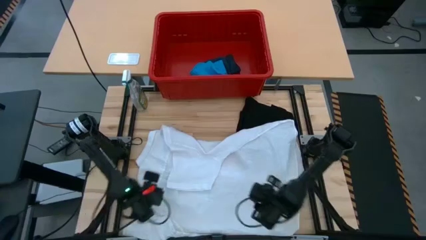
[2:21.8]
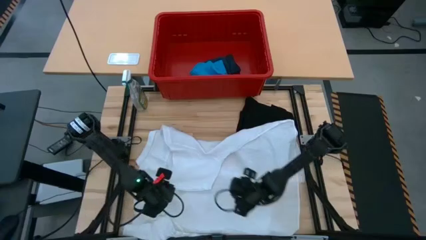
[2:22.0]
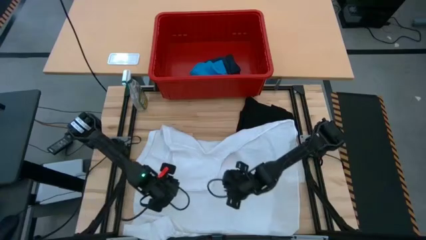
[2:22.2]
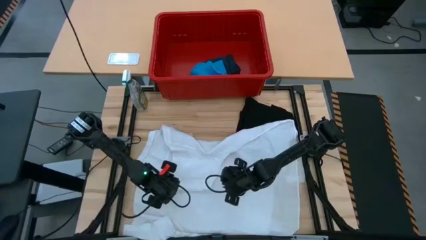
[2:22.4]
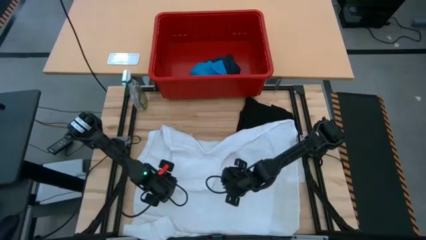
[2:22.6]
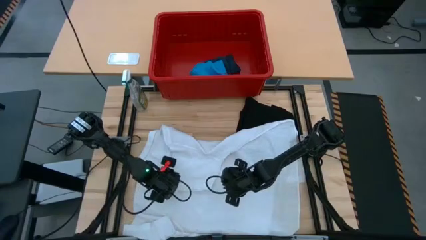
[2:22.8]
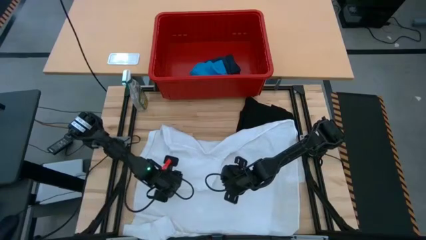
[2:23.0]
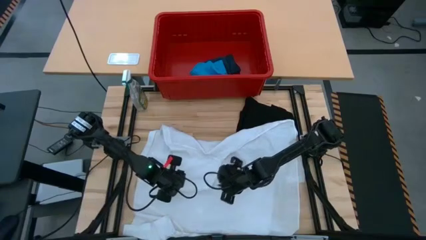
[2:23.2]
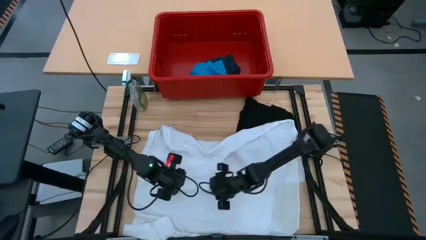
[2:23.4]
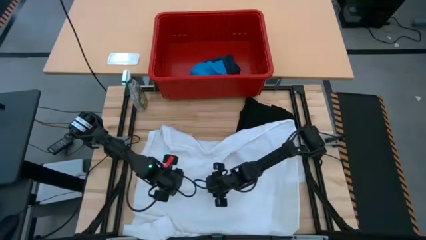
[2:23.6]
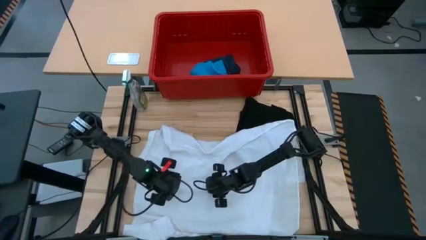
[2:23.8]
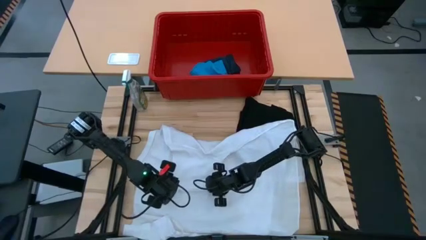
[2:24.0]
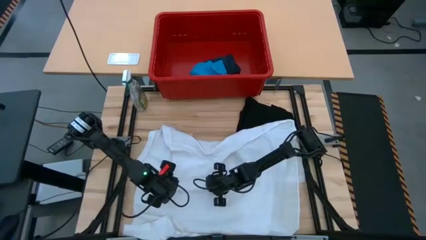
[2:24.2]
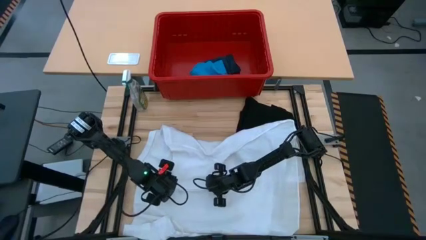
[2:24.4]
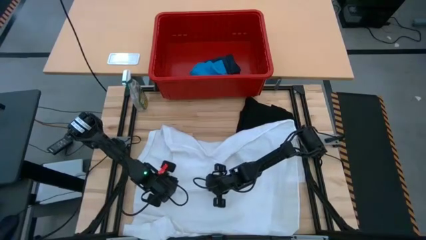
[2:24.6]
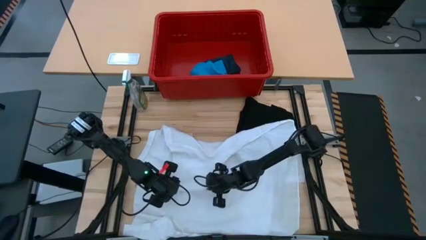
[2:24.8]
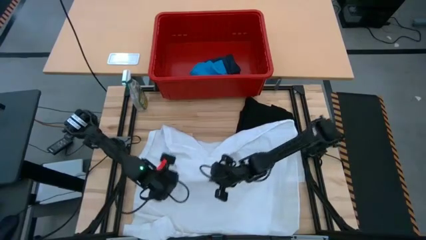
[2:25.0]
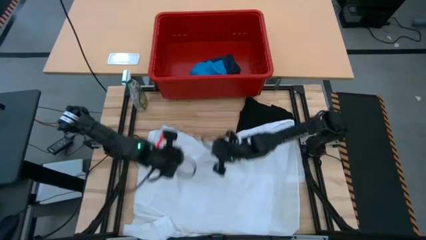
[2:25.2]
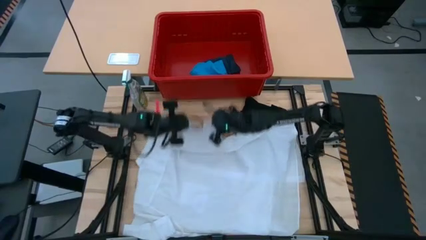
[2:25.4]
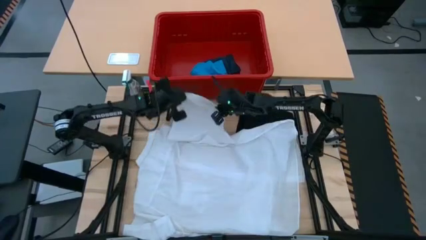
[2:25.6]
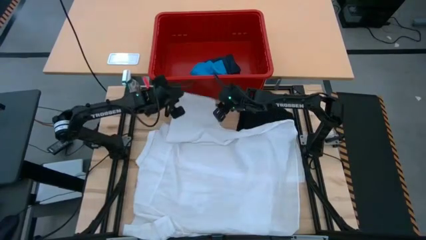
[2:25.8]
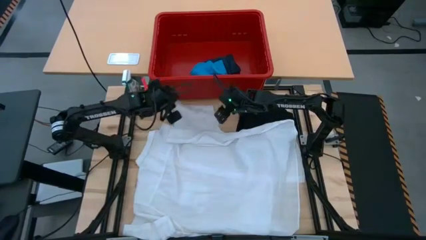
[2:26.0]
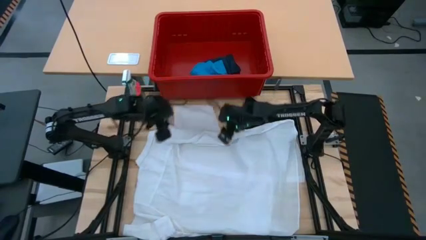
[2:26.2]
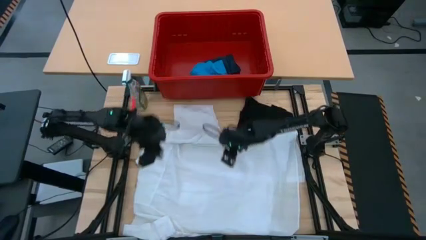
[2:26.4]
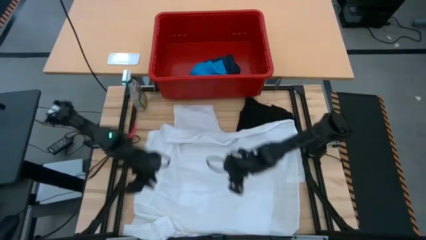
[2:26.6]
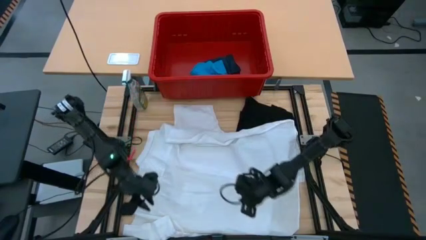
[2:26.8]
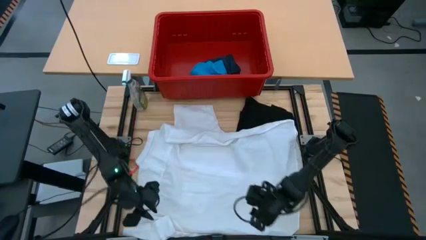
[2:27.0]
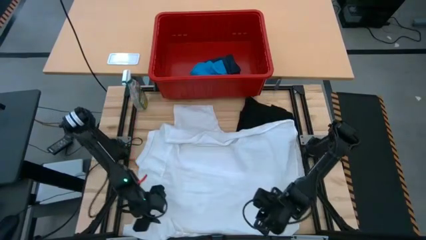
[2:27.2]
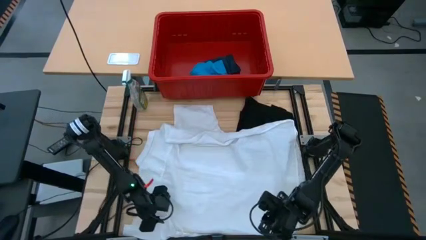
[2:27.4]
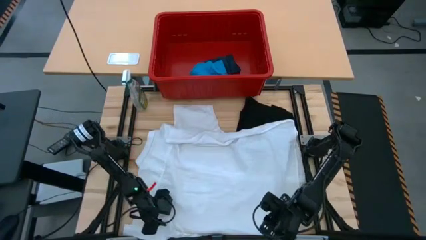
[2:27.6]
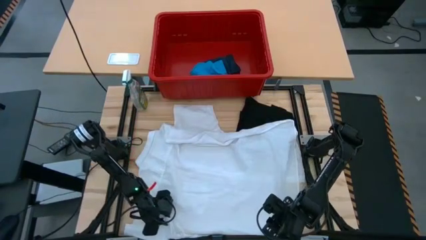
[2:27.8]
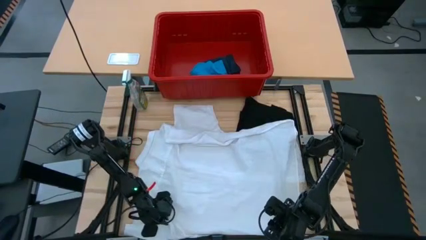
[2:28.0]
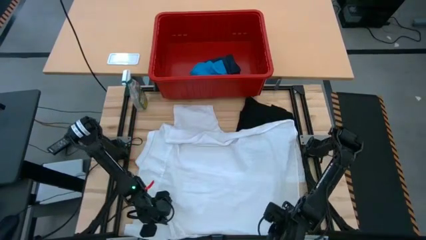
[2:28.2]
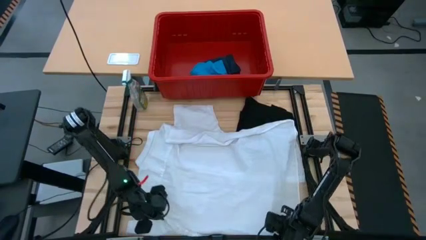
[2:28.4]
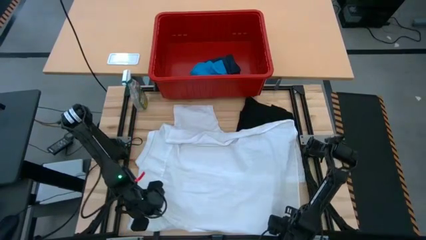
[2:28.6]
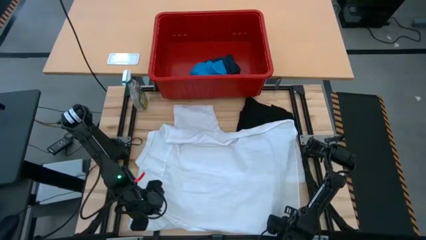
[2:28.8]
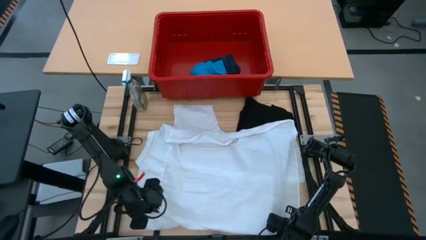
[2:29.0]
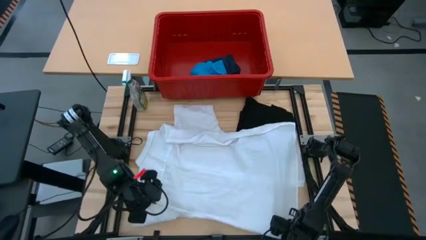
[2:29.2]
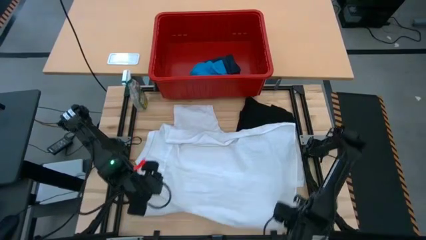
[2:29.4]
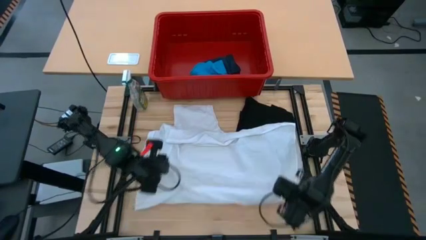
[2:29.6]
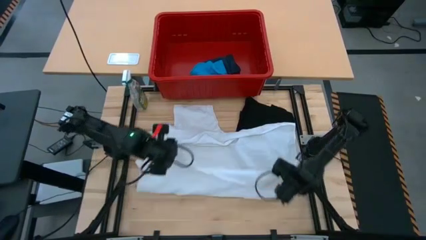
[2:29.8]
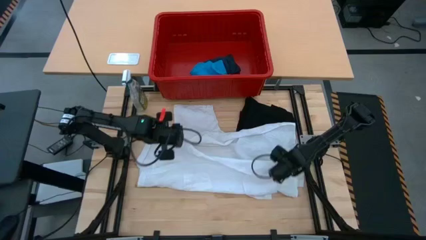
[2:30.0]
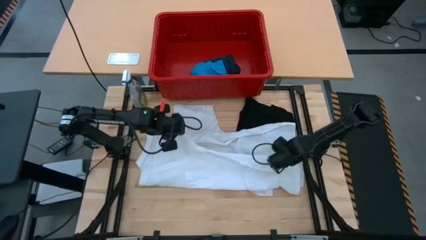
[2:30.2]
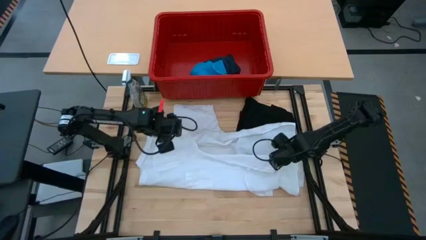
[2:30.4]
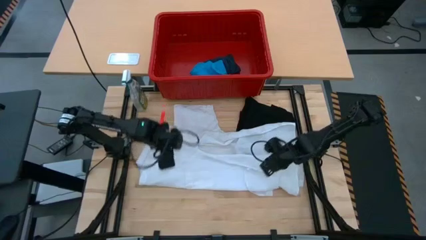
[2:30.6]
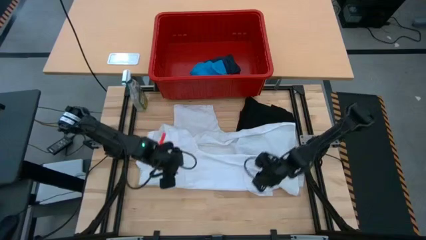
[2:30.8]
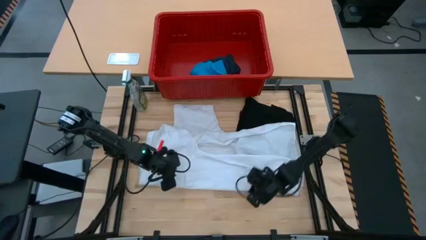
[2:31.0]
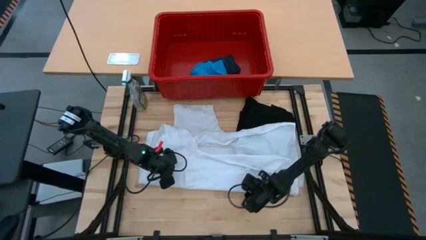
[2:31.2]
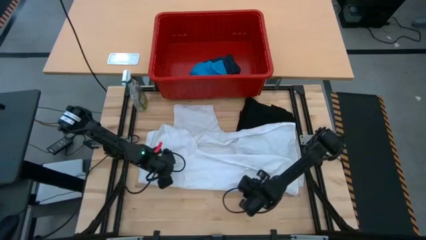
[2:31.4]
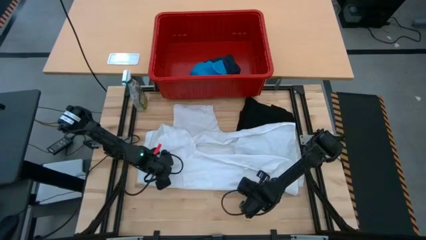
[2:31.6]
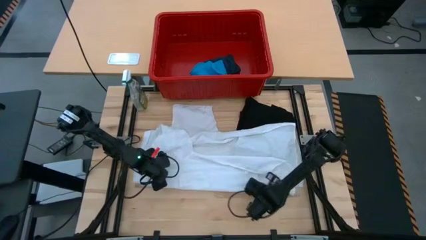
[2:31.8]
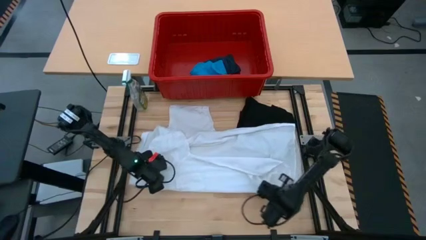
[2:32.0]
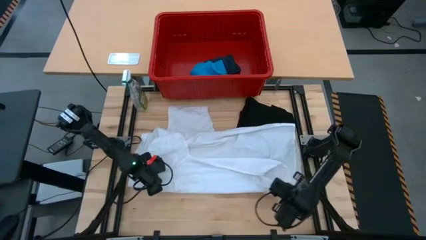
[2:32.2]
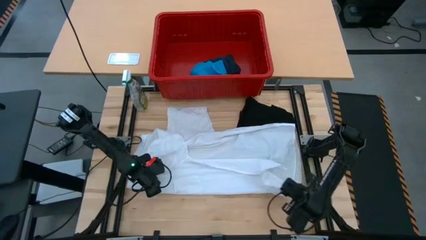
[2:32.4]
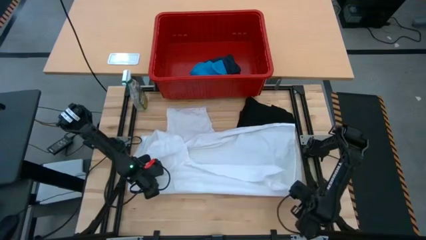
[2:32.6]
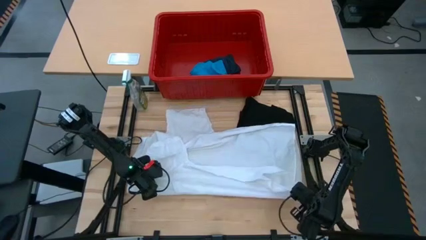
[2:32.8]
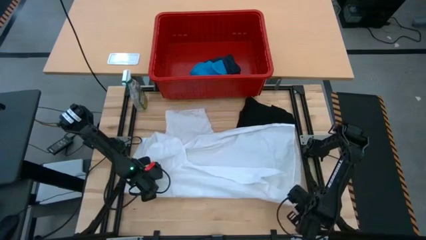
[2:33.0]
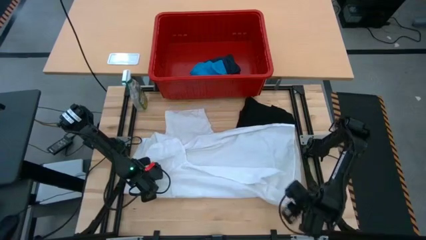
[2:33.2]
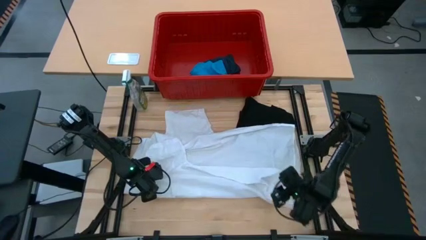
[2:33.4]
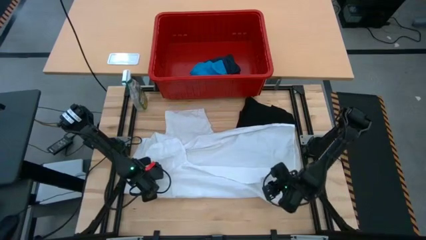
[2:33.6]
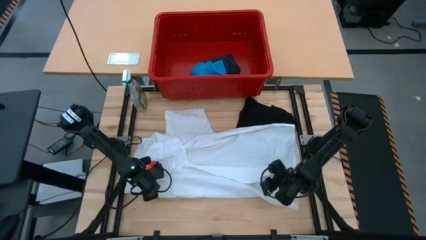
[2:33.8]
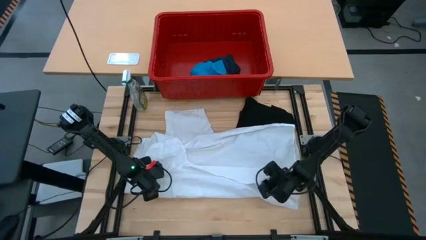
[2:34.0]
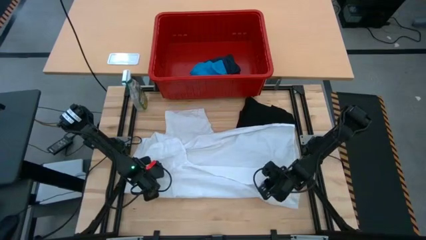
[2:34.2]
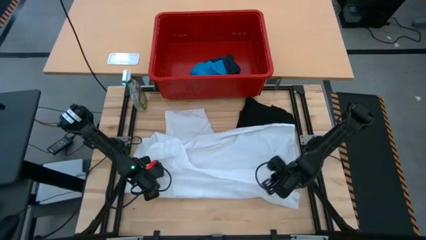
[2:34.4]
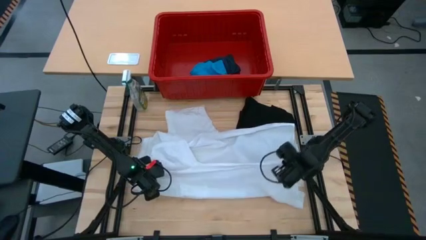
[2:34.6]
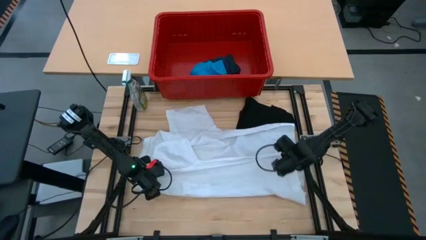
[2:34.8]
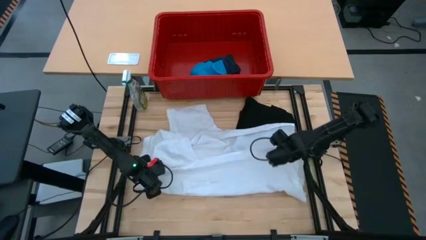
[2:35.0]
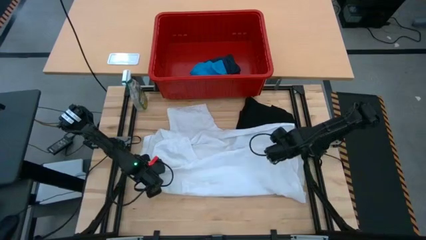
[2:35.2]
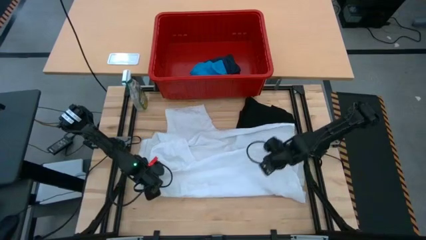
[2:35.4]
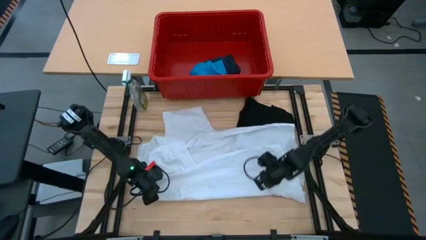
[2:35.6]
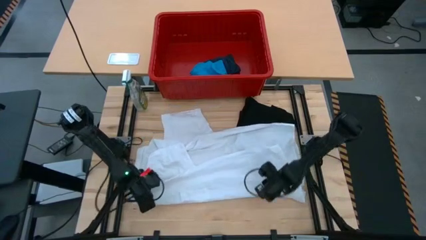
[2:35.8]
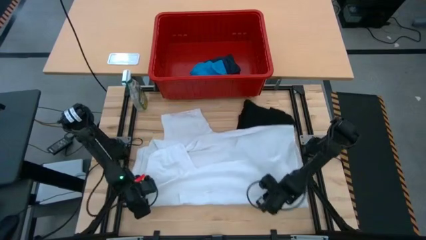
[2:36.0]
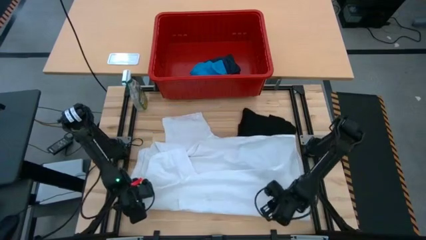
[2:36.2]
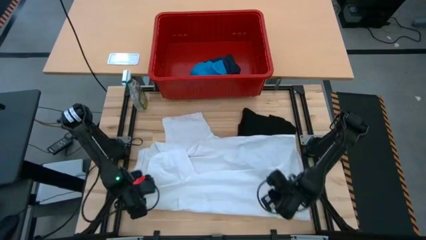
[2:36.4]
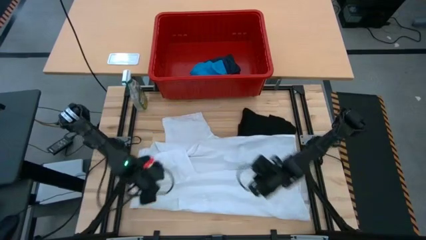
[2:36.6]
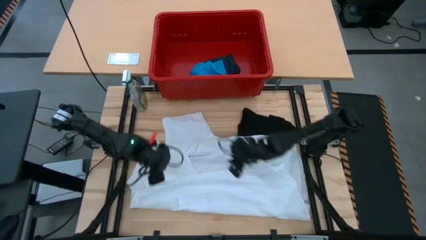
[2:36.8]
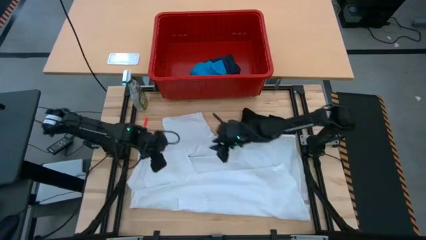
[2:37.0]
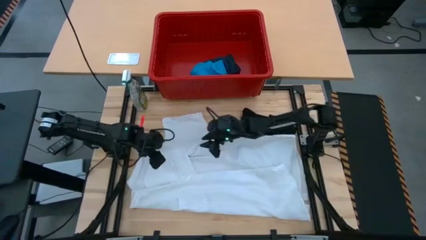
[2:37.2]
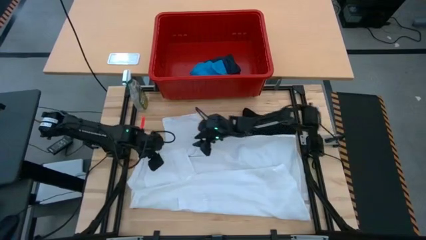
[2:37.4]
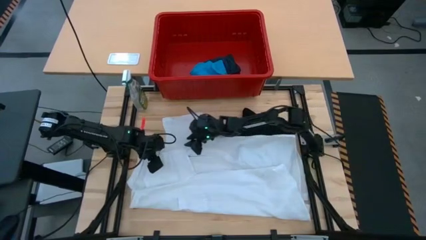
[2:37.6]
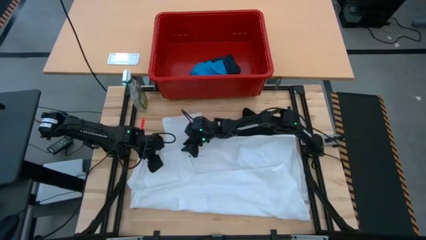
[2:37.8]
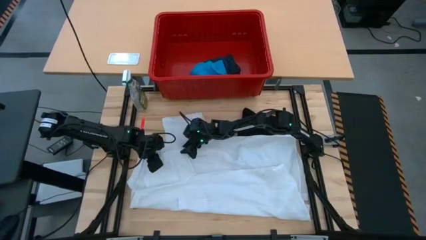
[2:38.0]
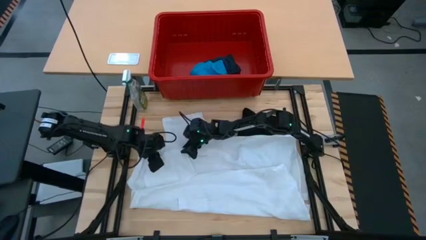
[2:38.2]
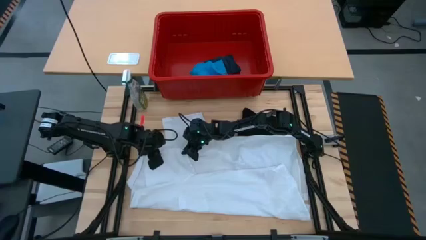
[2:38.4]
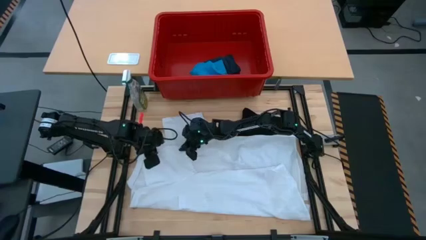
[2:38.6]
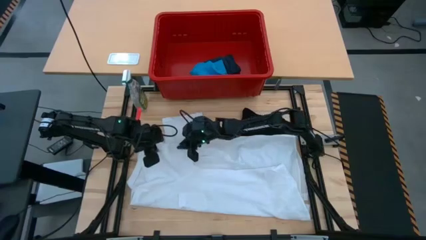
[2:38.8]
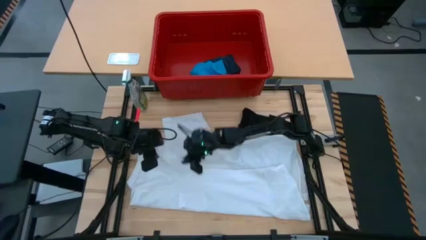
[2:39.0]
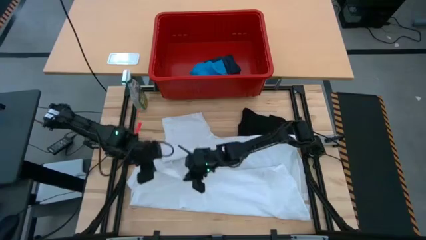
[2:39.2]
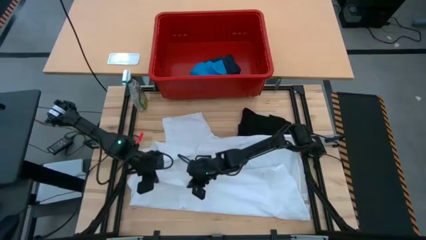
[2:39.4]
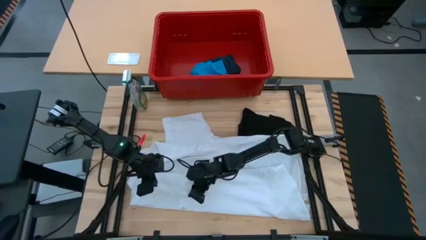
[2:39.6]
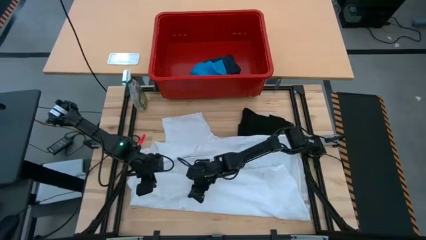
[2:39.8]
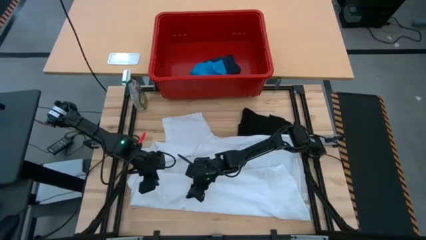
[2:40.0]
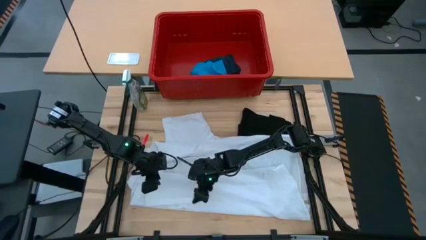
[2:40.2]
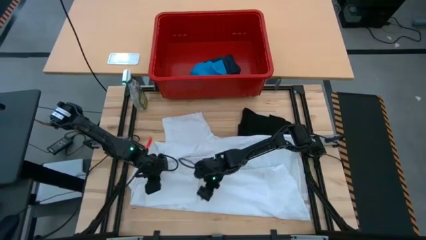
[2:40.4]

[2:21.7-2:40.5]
Task: Fold laundry
Fold the white polo shirt on the table
